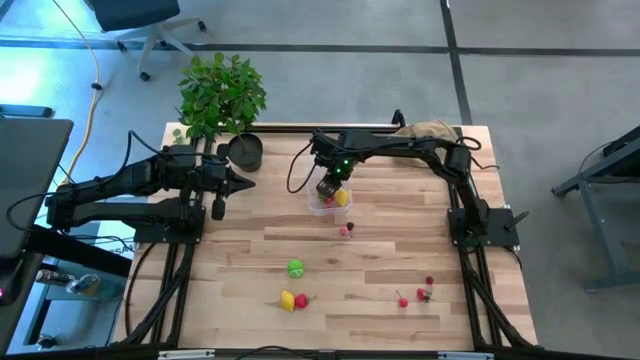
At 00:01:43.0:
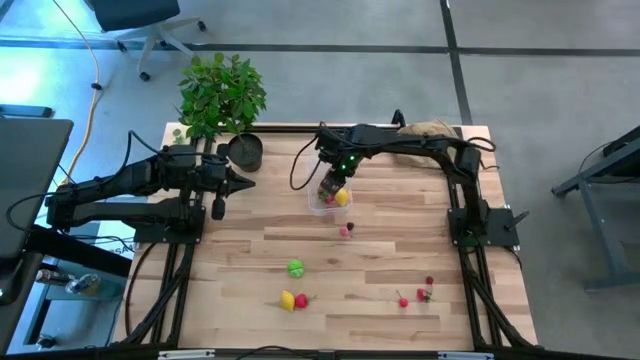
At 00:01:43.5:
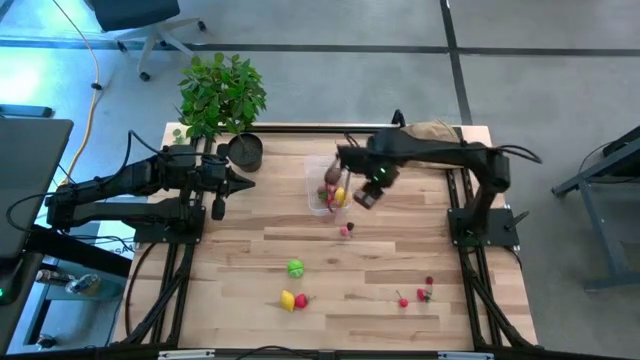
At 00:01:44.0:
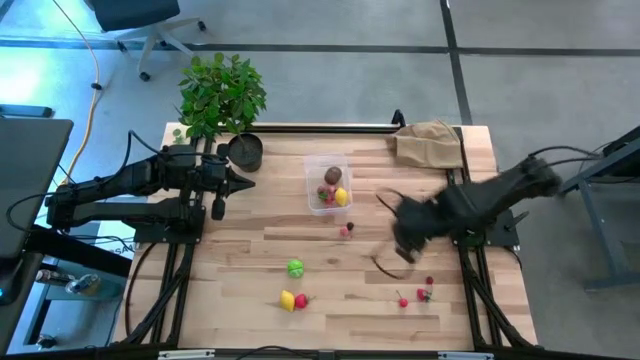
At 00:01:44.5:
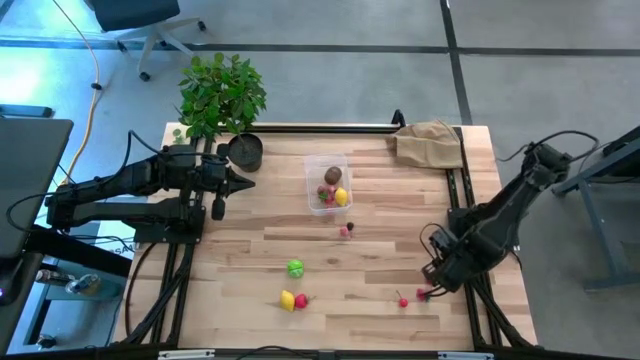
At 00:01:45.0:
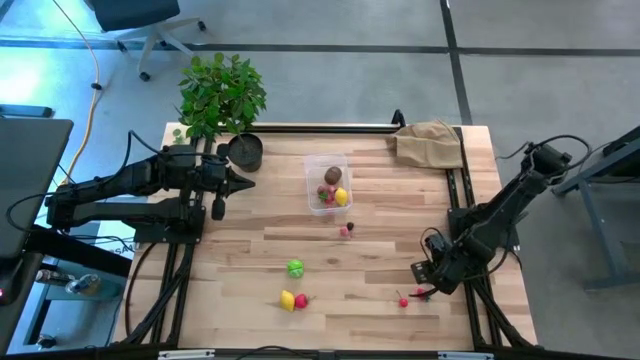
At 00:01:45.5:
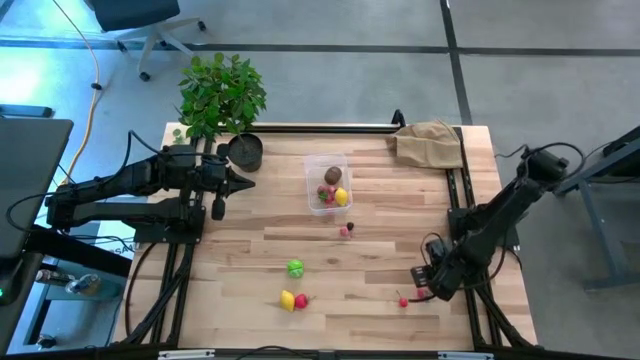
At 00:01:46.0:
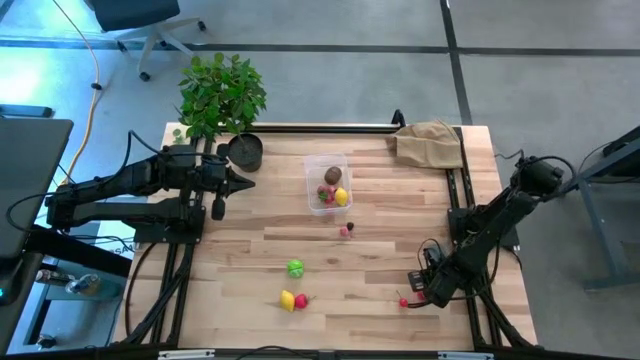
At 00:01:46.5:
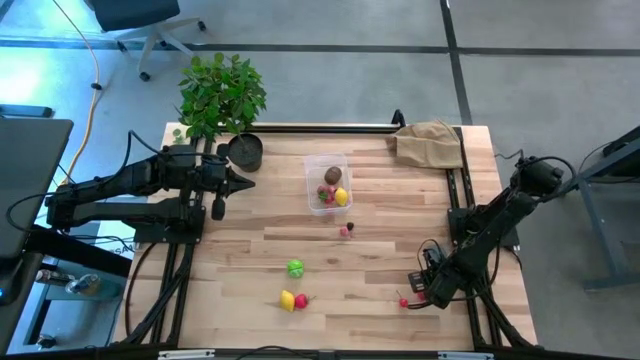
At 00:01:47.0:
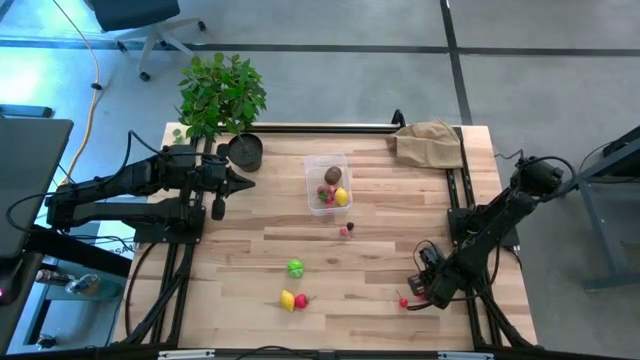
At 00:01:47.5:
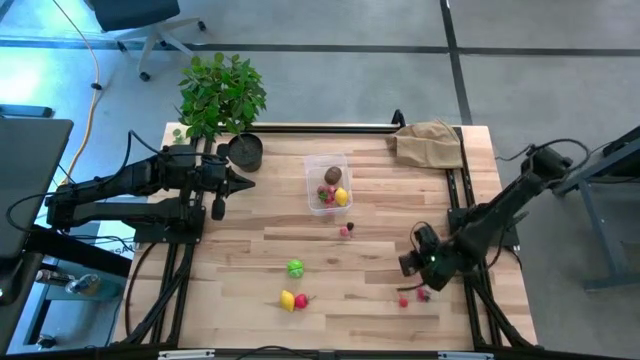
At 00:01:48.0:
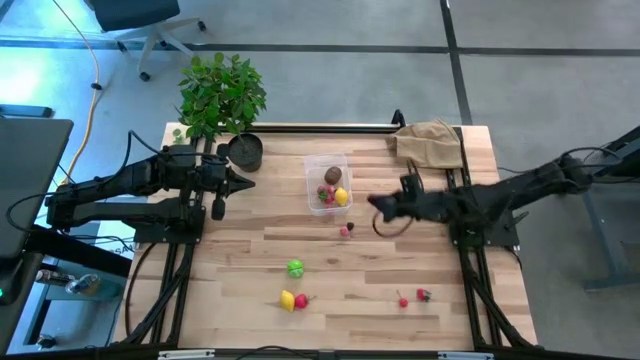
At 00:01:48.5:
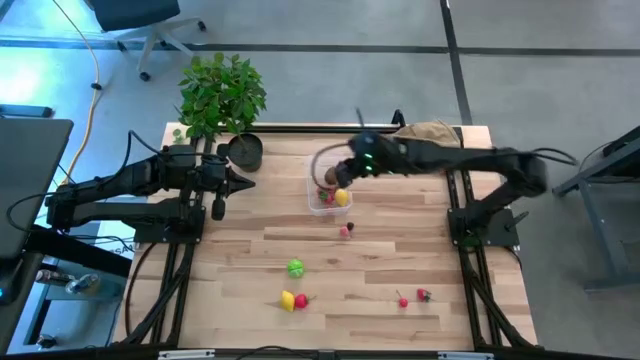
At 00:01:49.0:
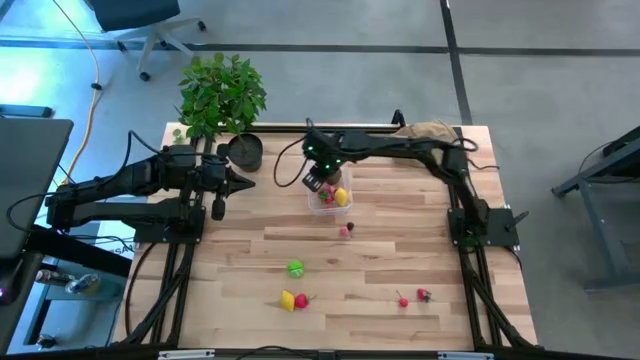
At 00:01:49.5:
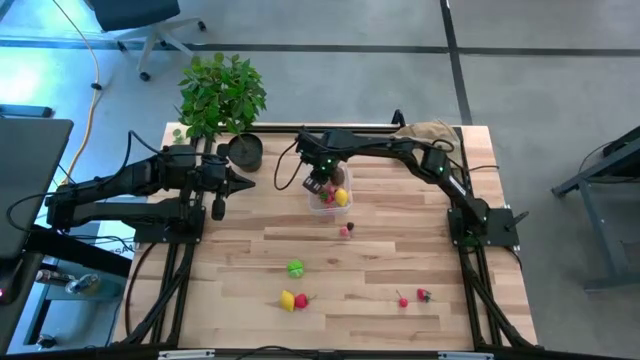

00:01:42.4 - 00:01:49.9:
Task: Pick and placing Produce into tupperware
Put the right dark red cherry into the transparent bin

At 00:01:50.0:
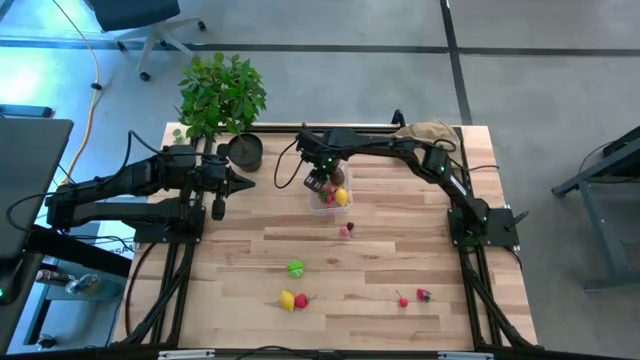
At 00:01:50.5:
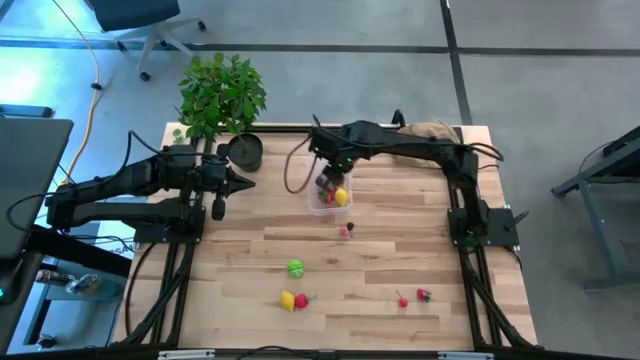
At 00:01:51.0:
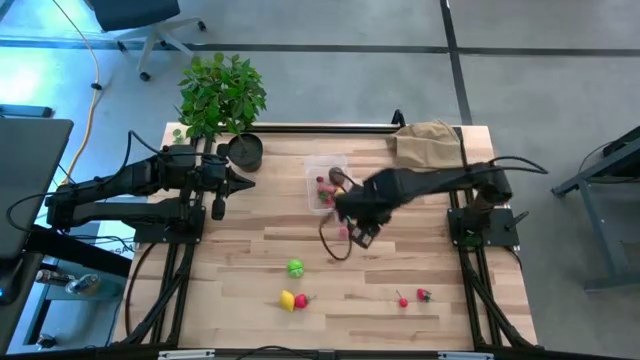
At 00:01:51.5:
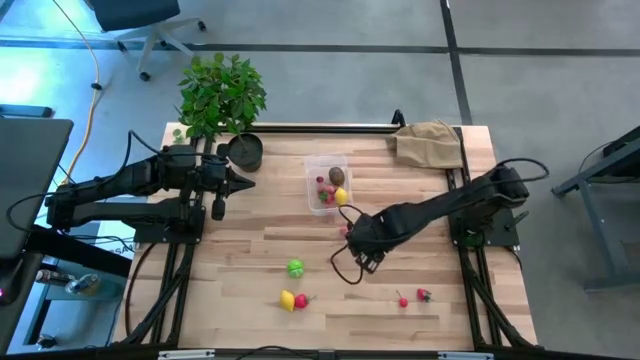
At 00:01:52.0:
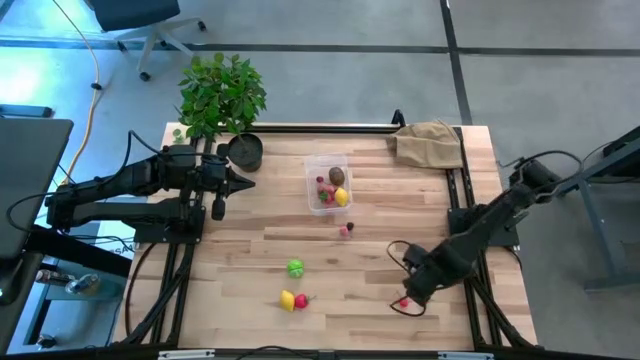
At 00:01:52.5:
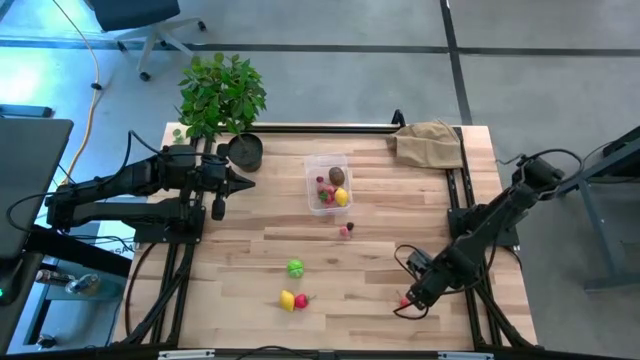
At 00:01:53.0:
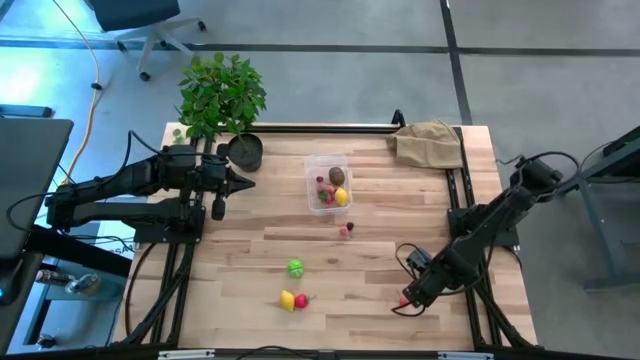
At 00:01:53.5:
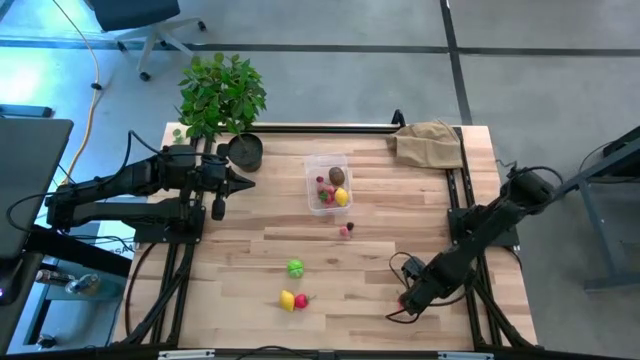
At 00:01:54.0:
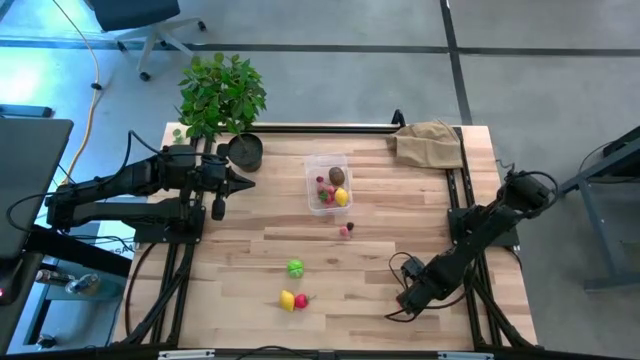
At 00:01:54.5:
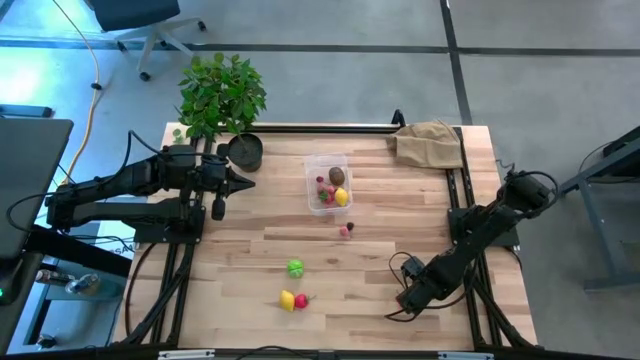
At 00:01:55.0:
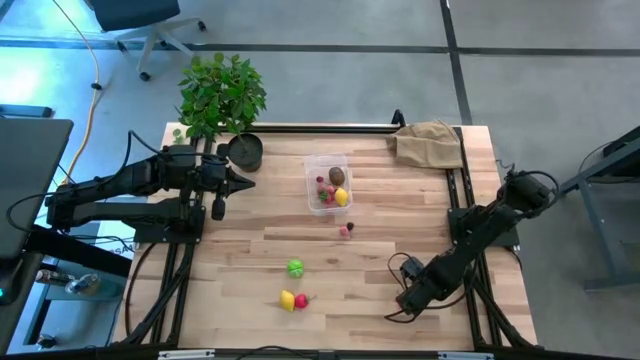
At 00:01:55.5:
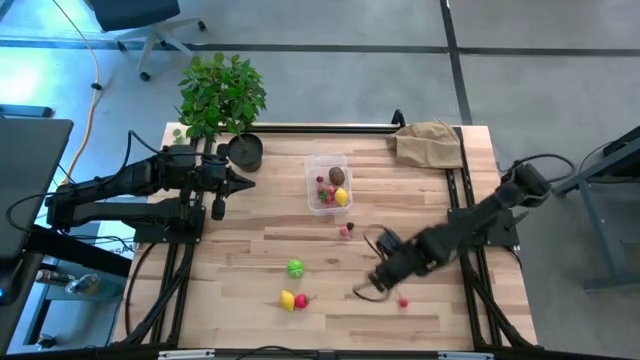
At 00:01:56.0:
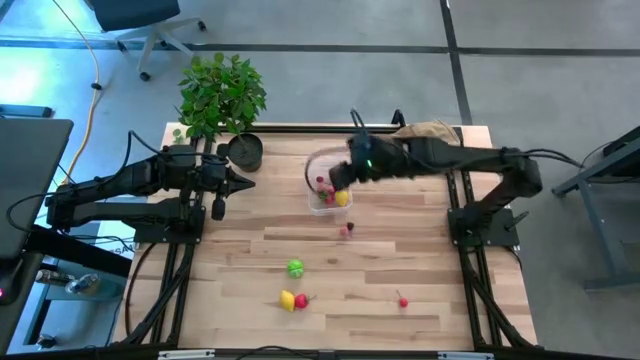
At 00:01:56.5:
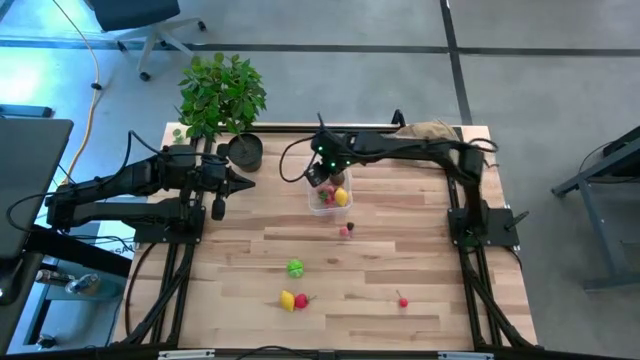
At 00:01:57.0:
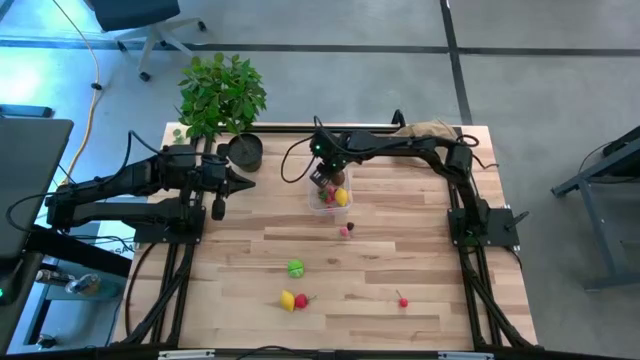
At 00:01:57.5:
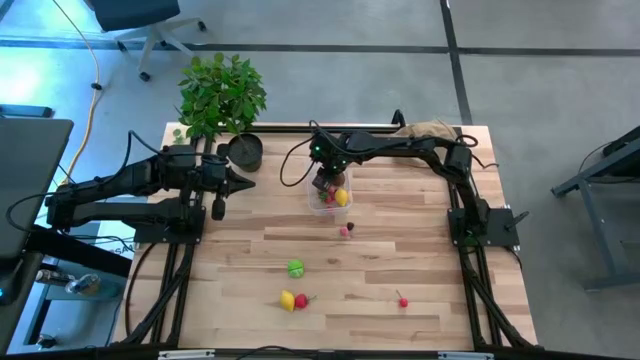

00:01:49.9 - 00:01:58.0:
Put the right red strawberry into the transparent bin

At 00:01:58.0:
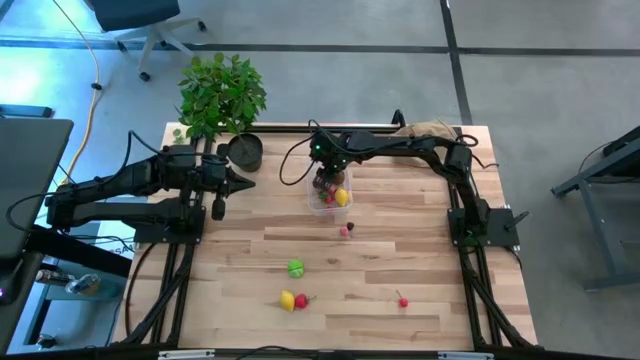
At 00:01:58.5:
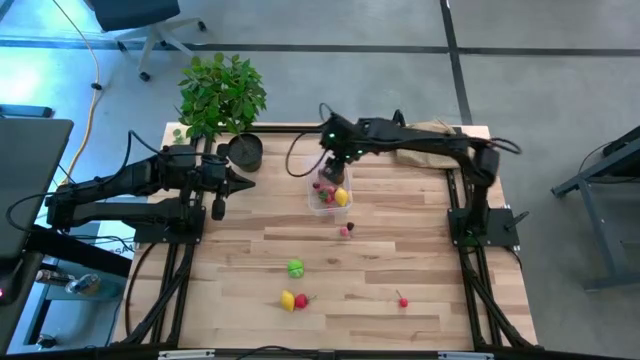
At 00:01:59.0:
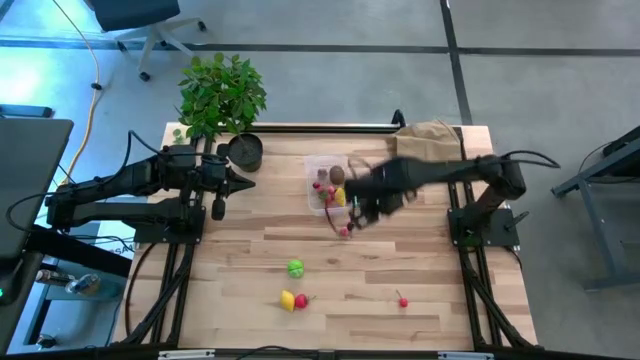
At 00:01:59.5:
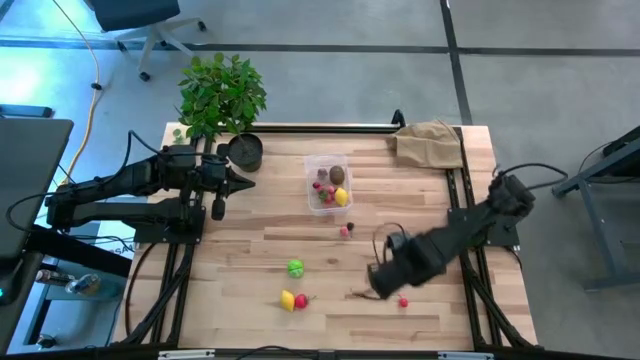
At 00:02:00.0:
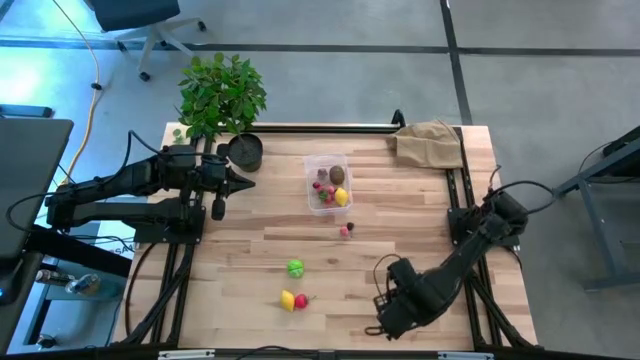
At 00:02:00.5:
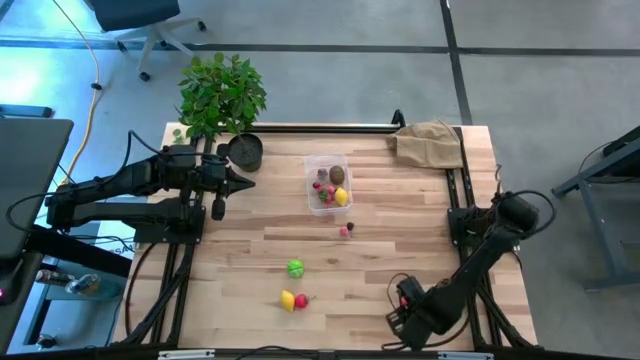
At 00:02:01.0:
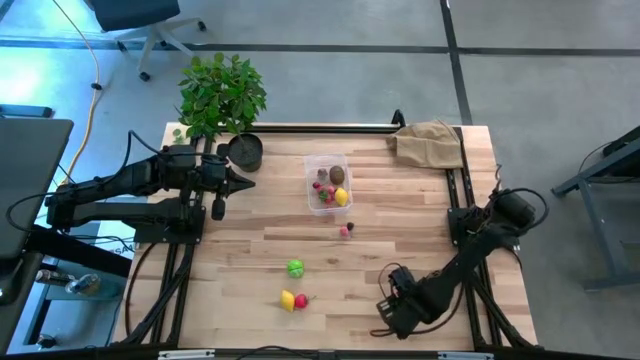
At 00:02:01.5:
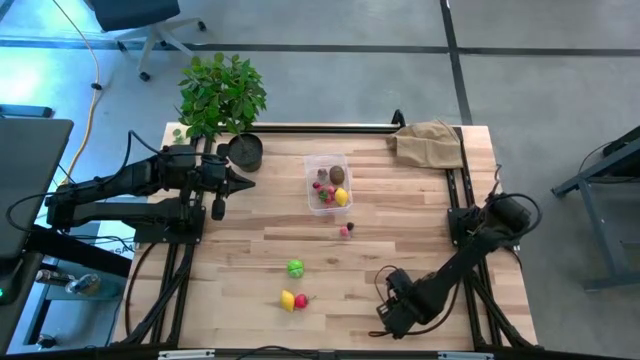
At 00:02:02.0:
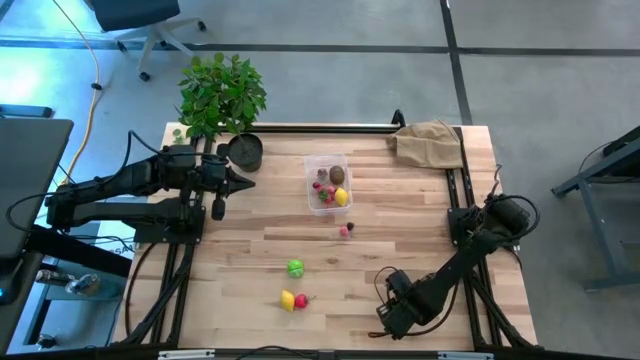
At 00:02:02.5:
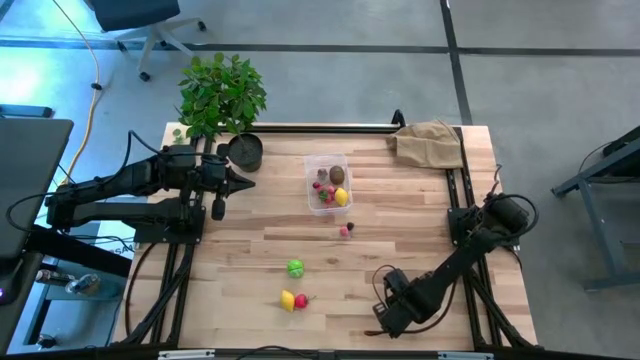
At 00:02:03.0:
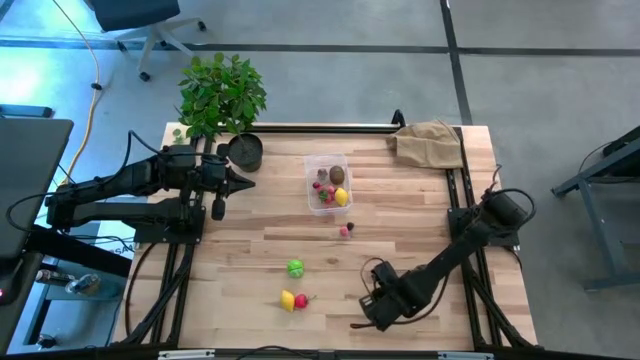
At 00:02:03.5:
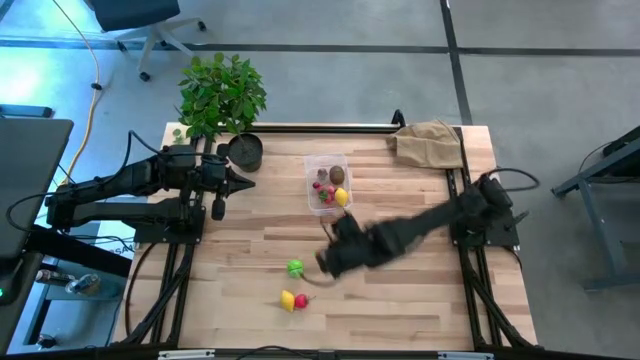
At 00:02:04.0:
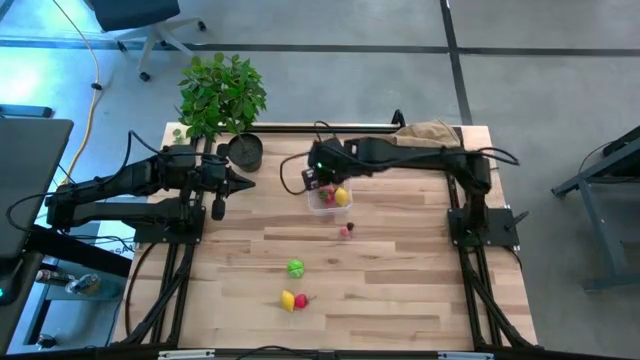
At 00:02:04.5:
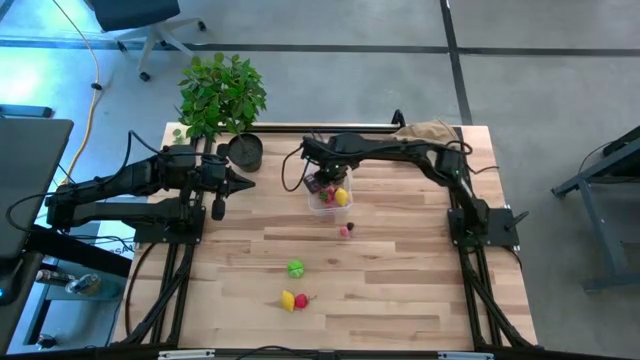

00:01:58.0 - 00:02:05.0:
Put the red cherry into the transparent bin
